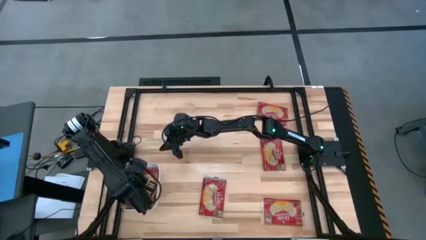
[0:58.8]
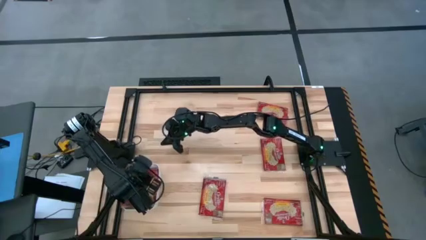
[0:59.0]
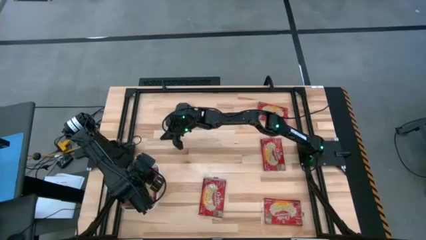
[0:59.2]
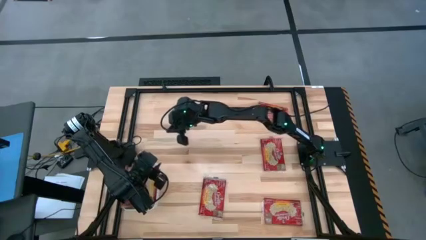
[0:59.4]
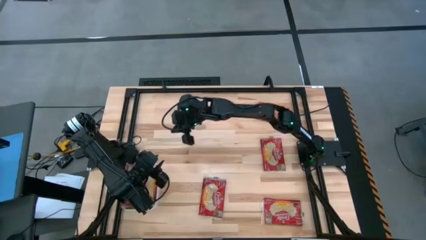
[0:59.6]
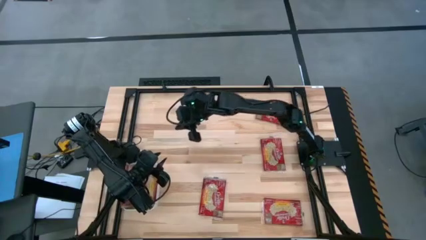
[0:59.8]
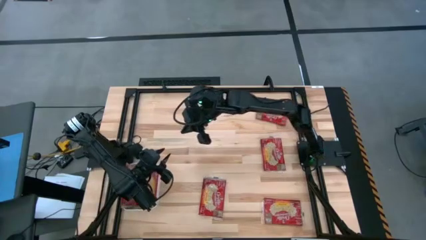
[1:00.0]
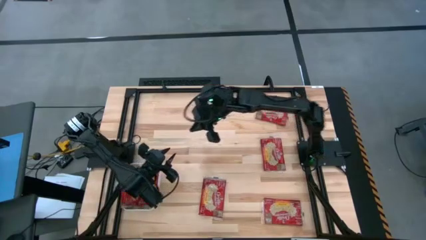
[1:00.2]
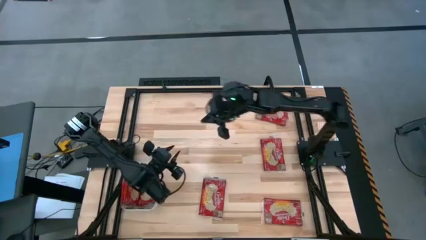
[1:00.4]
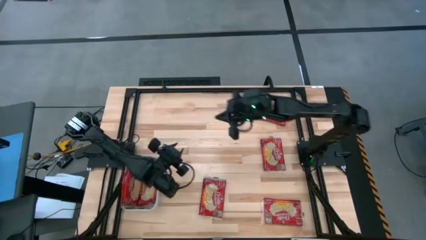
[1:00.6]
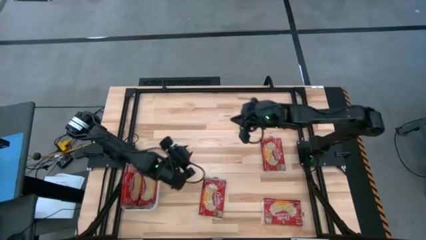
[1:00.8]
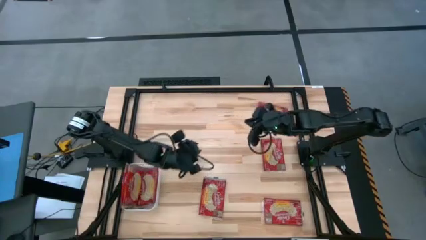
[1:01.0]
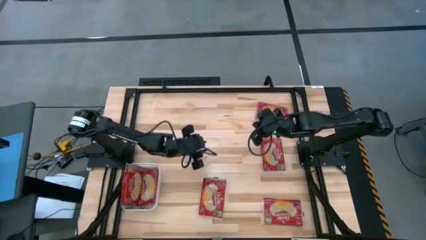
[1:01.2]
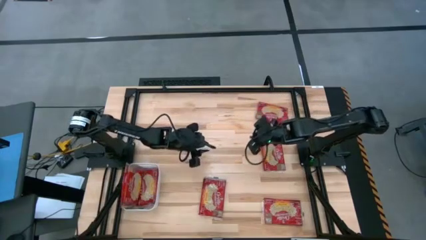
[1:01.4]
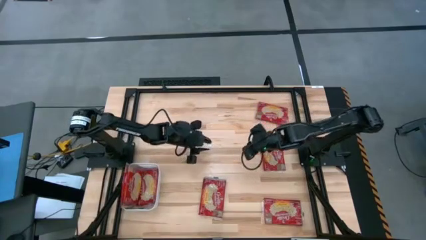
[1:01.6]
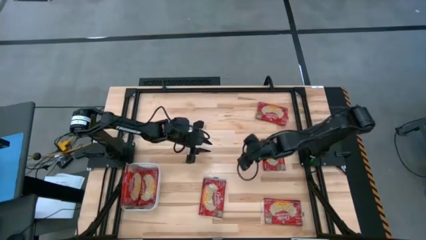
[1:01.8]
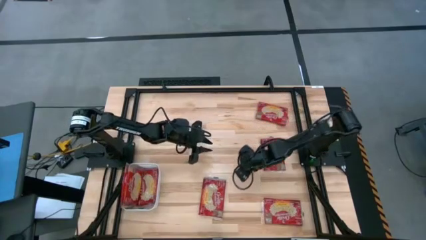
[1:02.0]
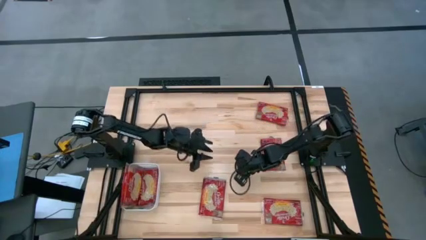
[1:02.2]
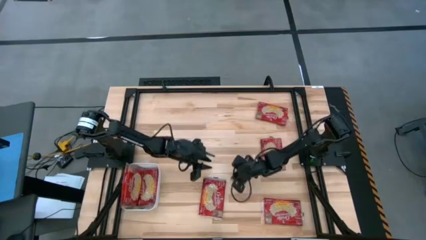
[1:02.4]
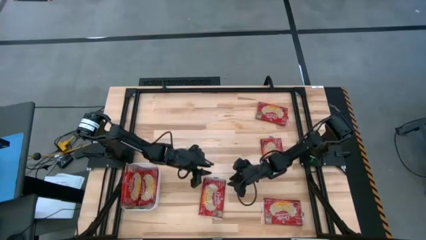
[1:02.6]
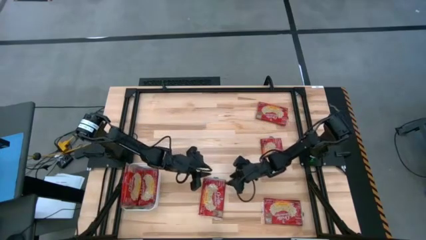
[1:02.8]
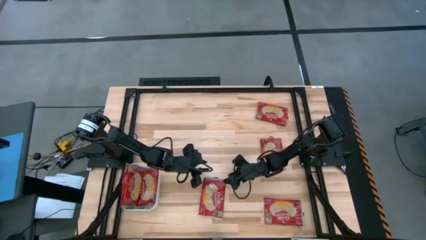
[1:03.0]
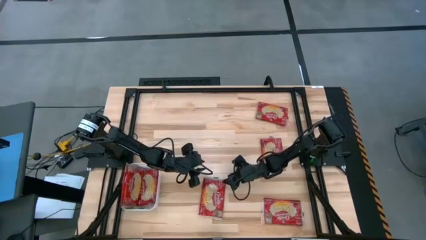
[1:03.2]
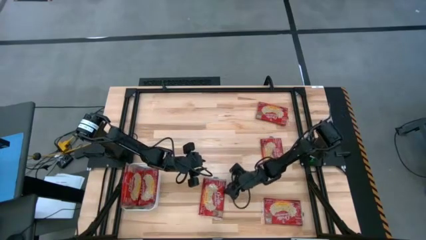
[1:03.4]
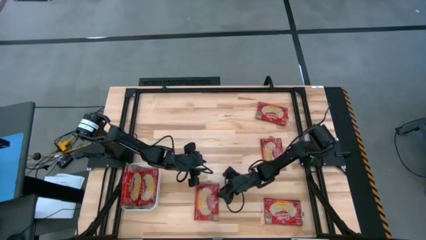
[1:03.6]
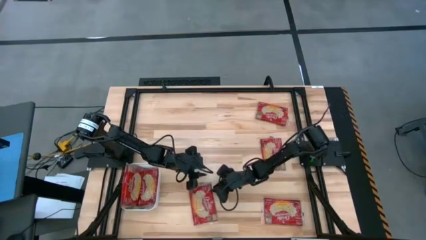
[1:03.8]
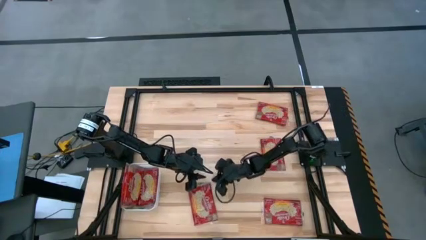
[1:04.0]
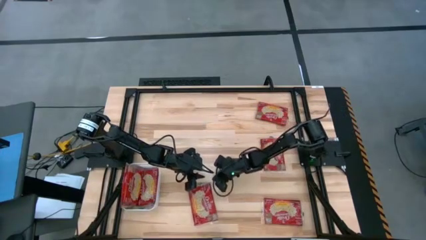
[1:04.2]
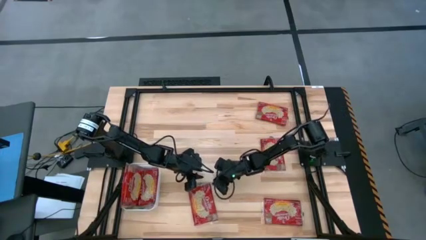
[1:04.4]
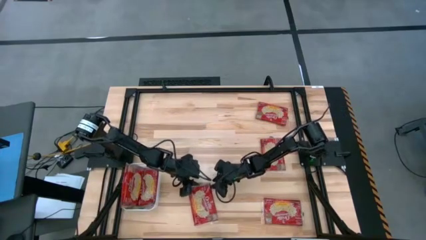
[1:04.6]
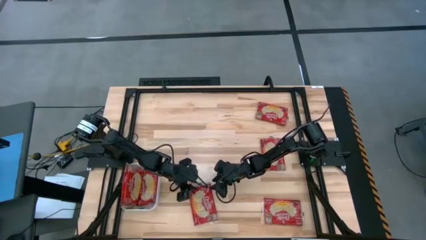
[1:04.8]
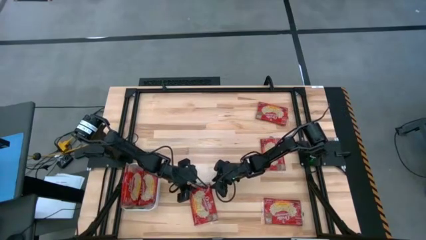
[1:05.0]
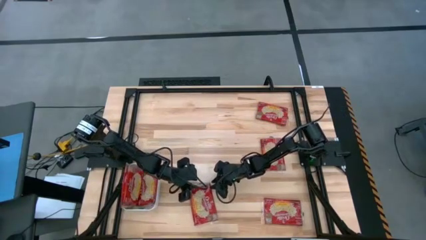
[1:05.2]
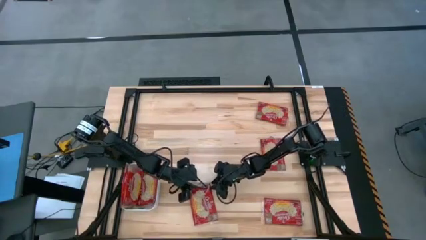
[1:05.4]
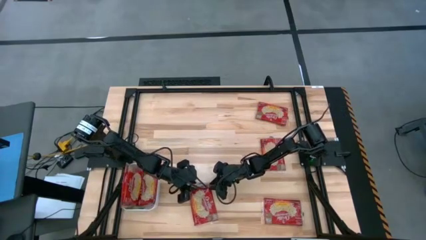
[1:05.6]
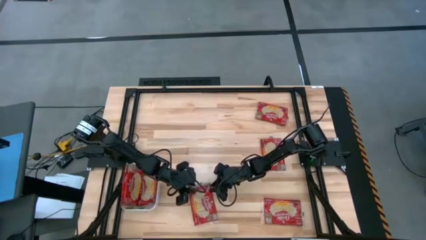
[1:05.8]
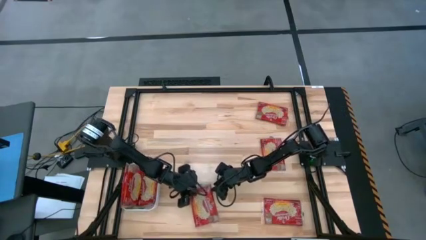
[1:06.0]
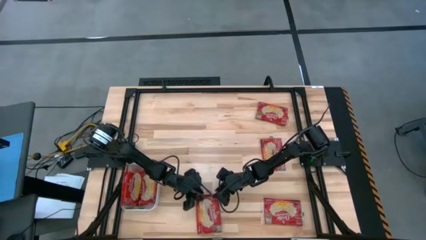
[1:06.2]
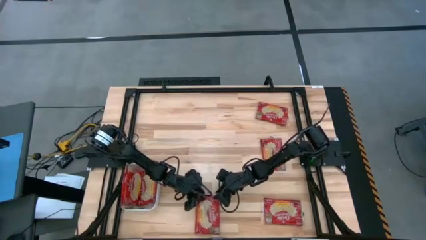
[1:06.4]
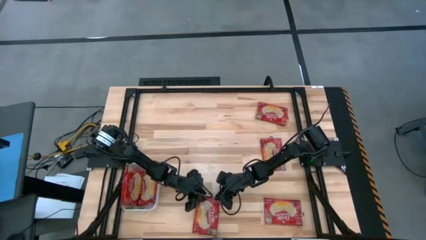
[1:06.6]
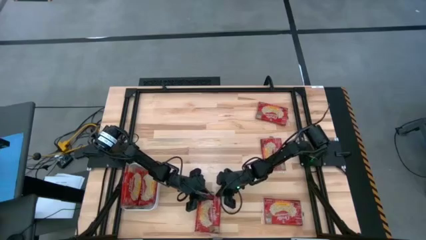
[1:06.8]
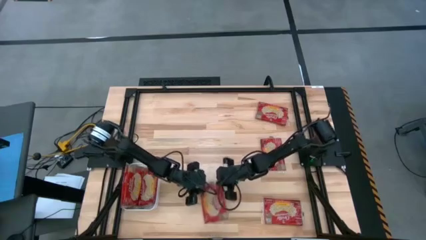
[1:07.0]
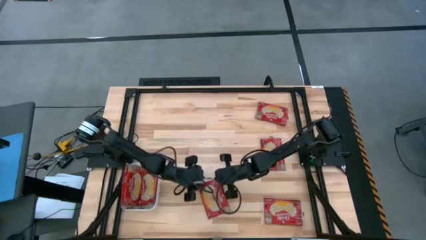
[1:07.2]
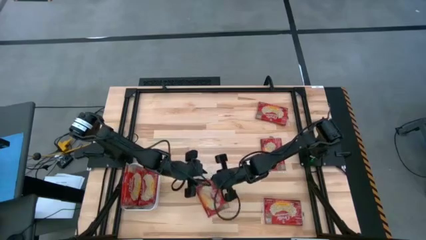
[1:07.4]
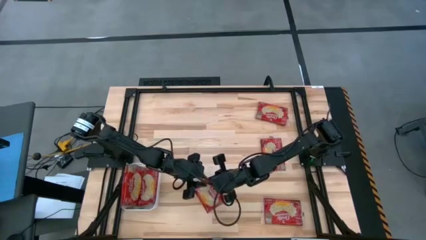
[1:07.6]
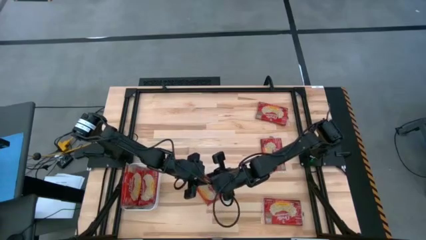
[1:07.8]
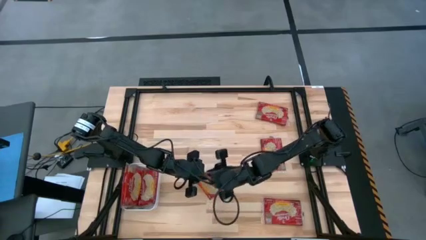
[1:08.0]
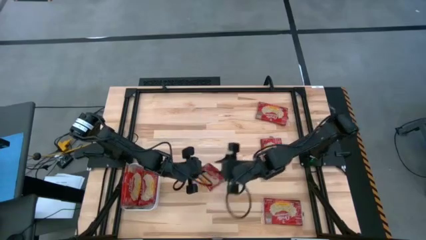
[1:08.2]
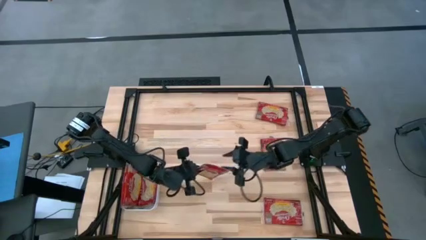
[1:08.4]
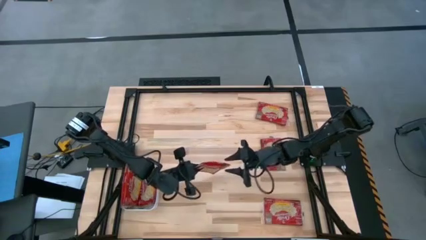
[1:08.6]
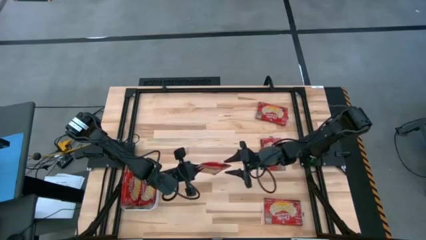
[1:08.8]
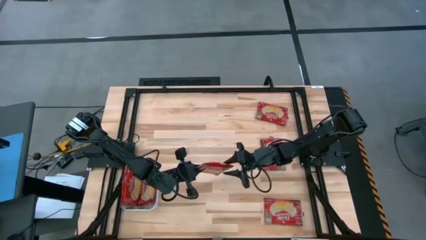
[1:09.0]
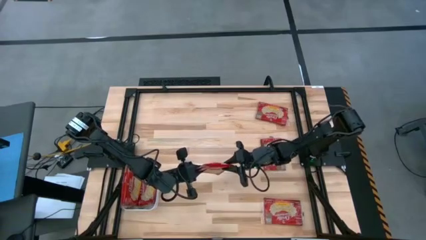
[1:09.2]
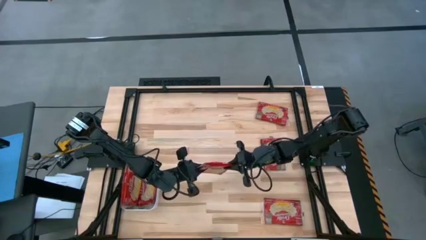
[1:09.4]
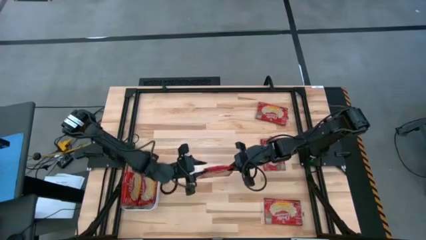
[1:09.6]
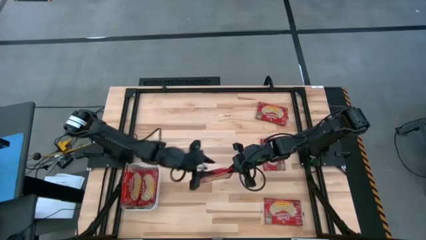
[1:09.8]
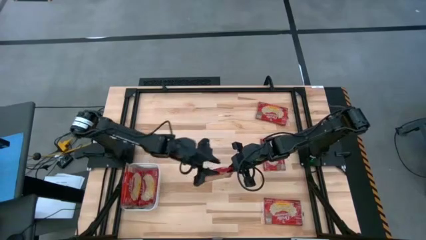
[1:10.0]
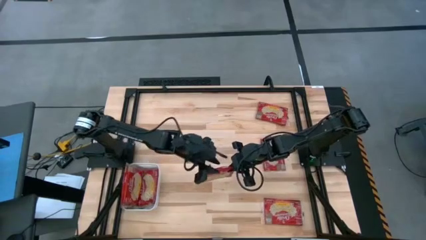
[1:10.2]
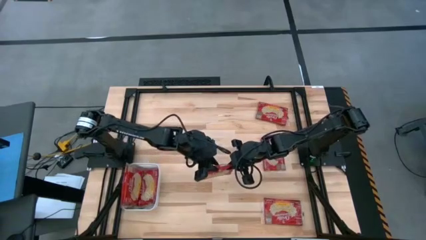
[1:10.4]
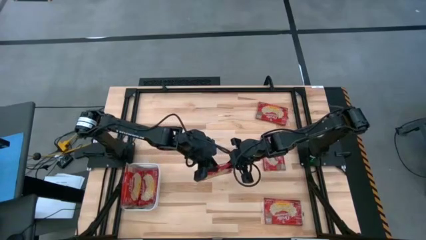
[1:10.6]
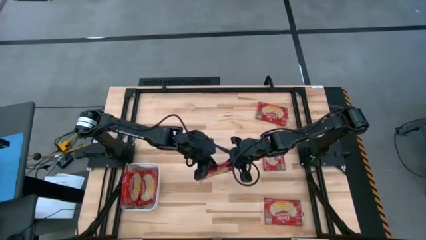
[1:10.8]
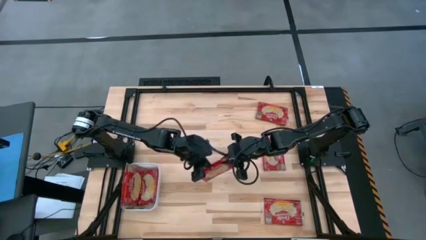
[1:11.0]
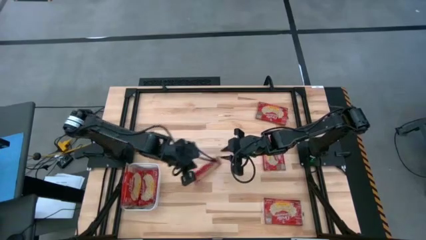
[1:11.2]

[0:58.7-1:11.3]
Task: Sort popcorn bags into baskets
Put the red popcorn bag into the white bin

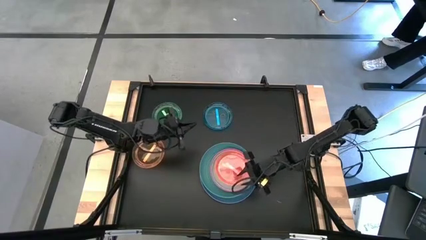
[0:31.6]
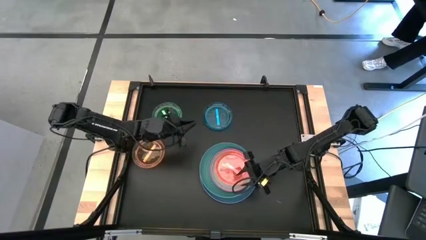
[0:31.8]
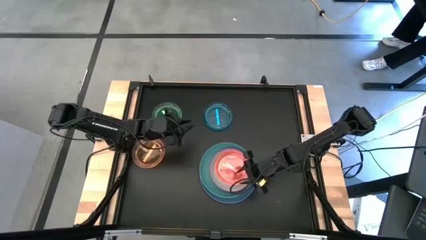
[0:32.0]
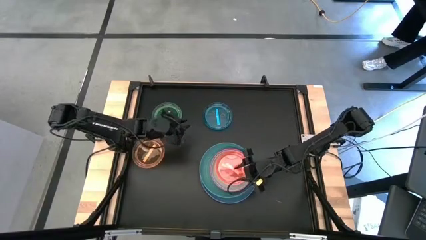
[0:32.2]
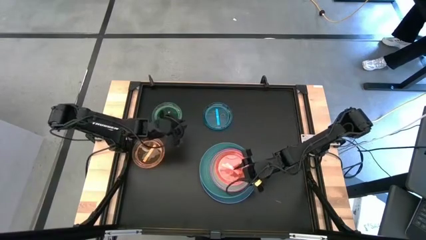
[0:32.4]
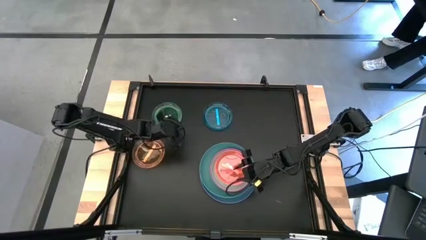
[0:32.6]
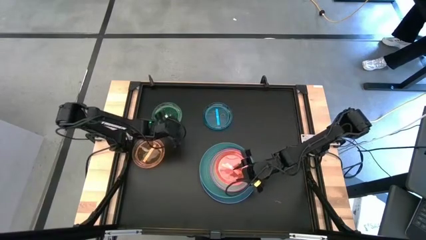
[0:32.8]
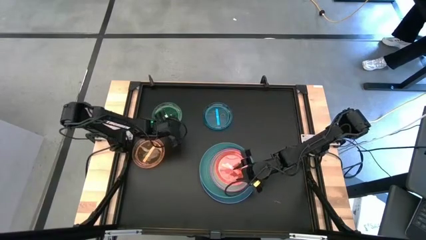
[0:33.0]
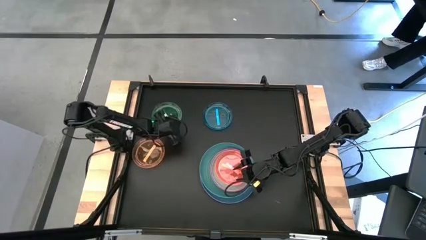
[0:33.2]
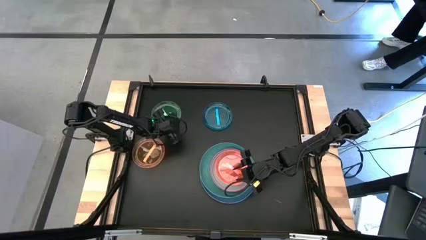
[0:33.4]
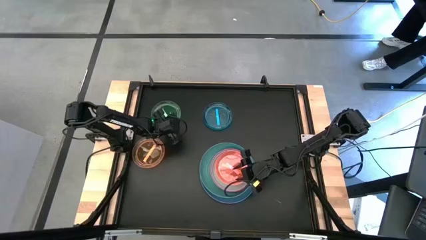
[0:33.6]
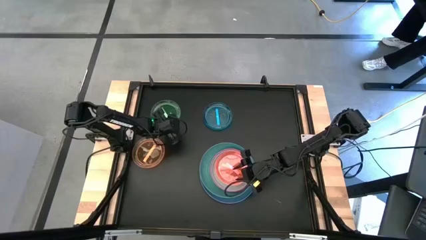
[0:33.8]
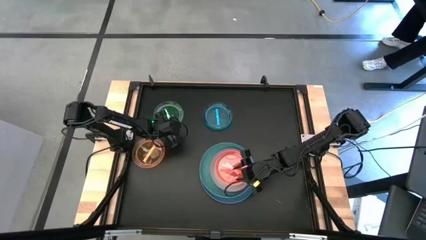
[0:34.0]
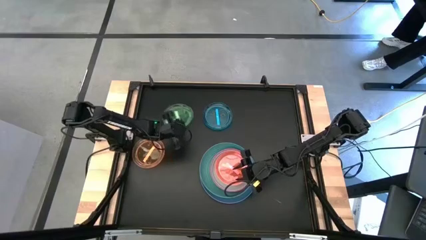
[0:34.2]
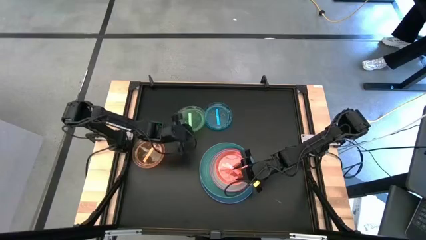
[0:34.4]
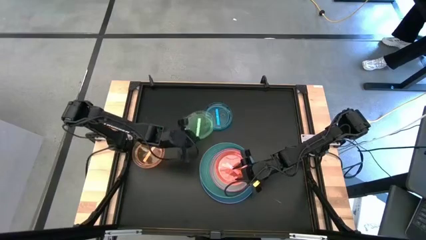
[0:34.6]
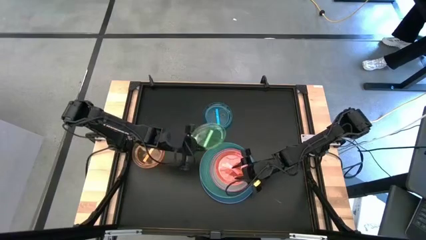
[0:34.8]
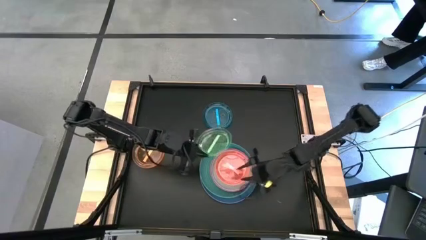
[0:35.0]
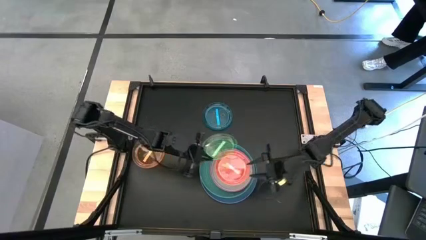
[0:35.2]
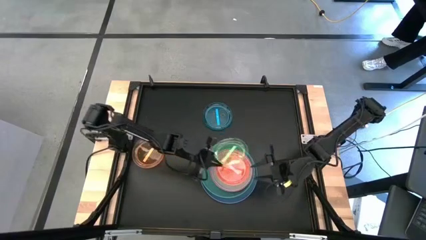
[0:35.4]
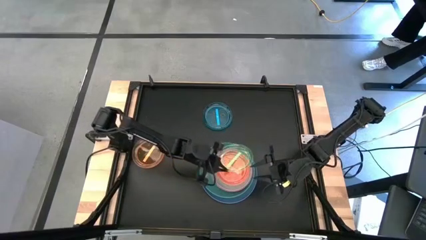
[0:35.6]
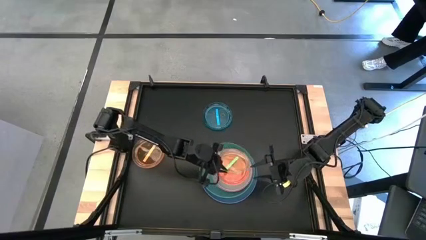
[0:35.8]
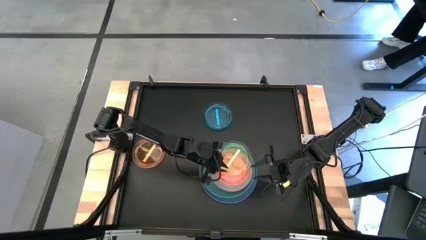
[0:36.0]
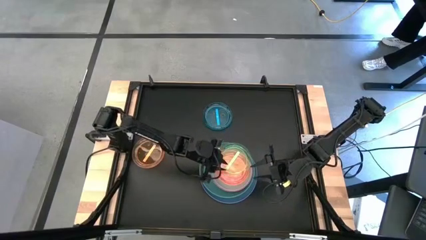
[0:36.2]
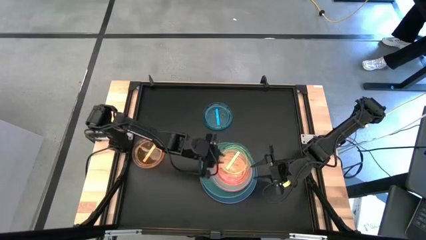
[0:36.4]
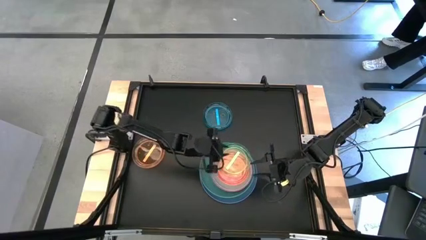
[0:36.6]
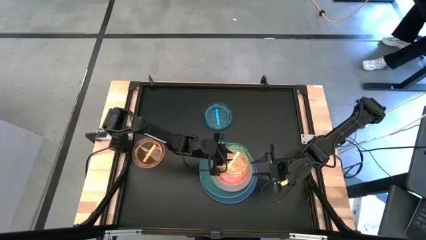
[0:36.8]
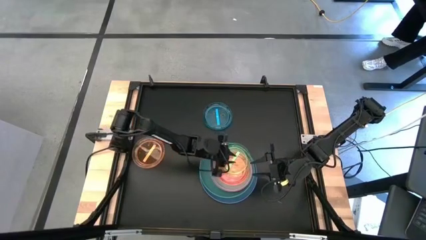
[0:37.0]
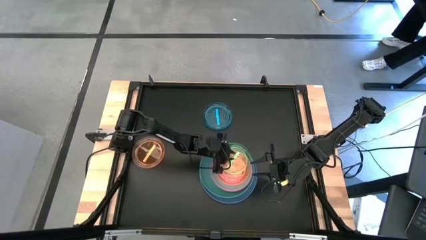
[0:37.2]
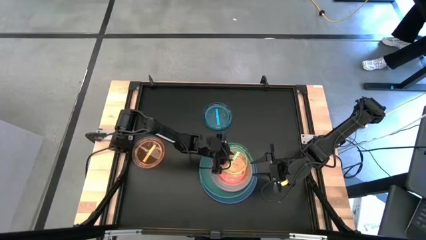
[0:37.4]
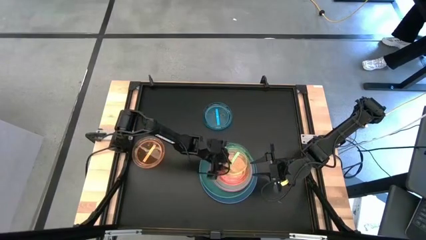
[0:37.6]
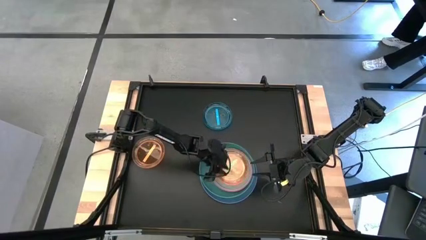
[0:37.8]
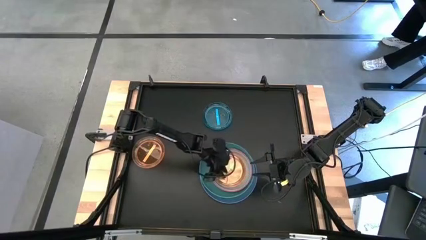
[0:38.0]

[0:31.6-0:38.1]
Task: Stack plastic plates
Stack the green transparent plate on top of the pink transparent plate
